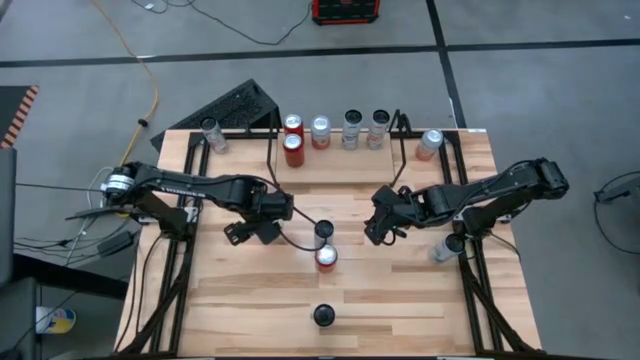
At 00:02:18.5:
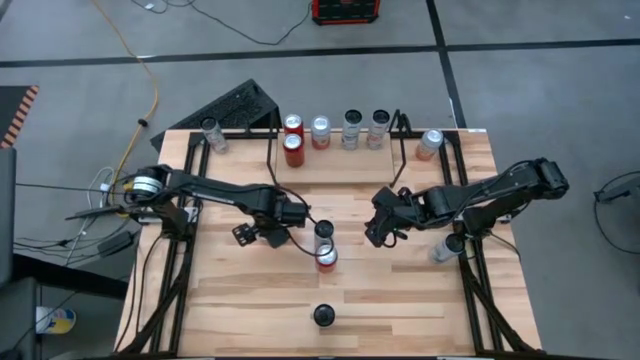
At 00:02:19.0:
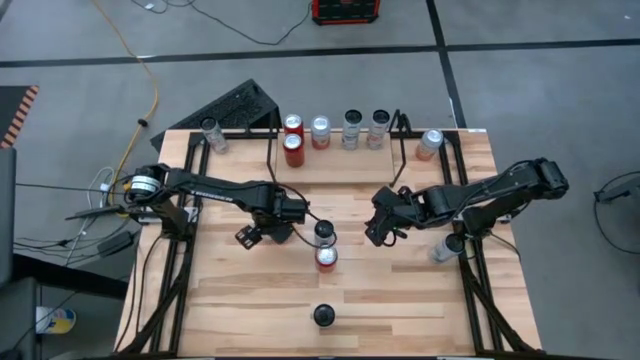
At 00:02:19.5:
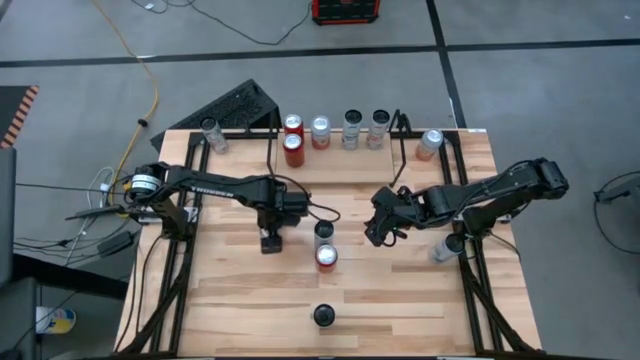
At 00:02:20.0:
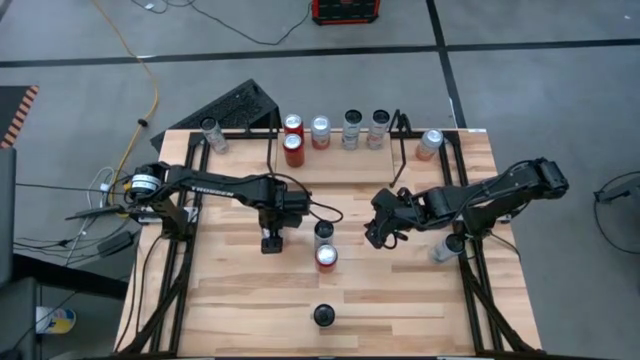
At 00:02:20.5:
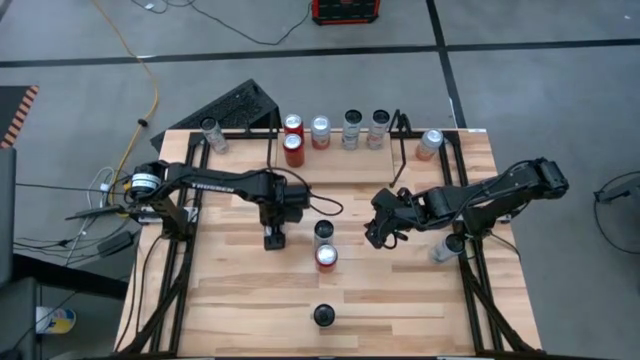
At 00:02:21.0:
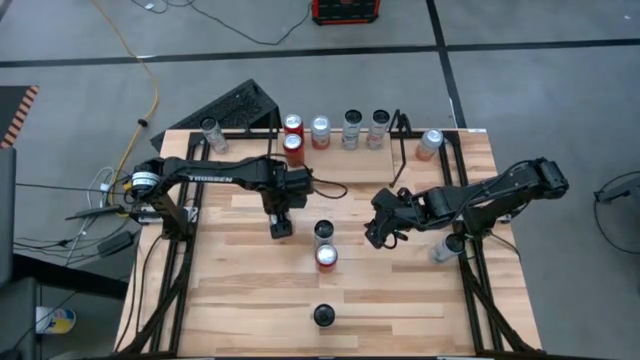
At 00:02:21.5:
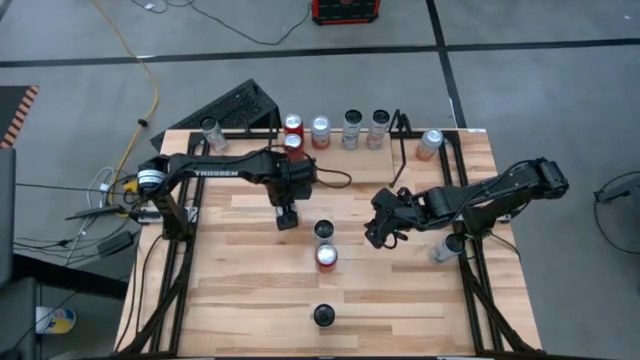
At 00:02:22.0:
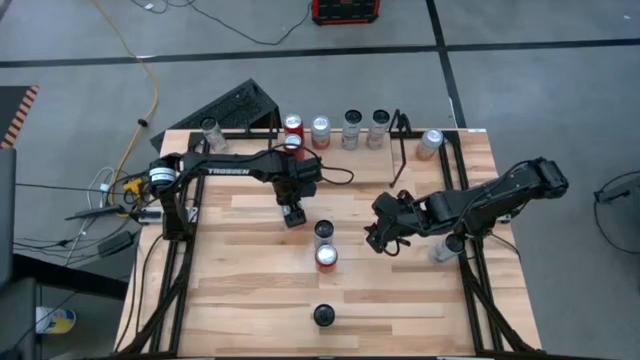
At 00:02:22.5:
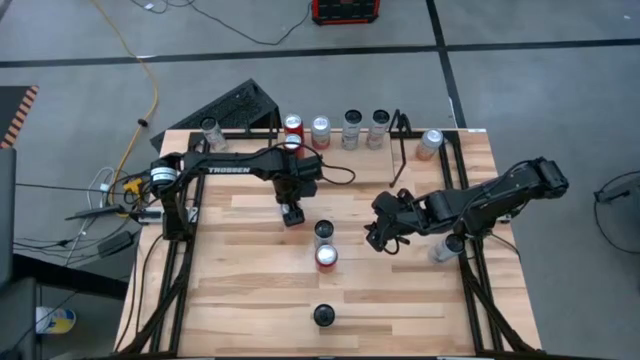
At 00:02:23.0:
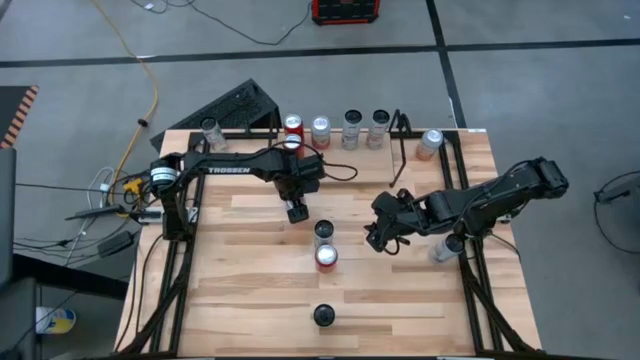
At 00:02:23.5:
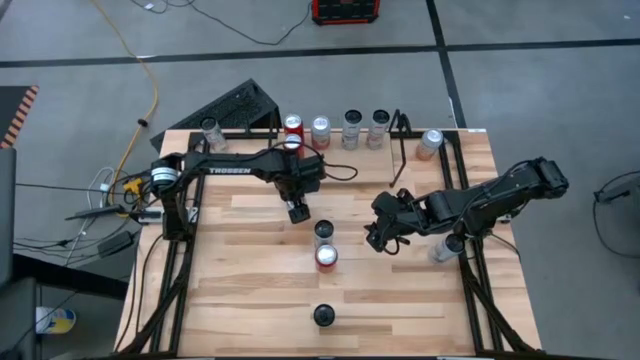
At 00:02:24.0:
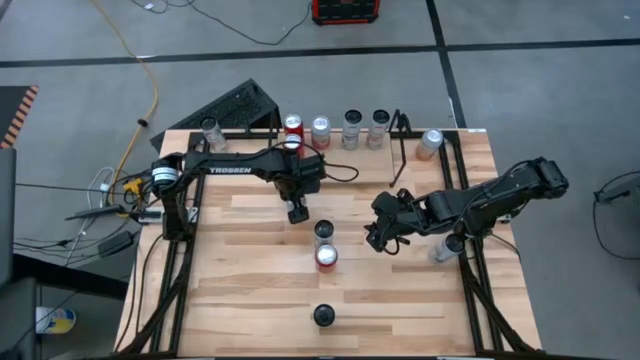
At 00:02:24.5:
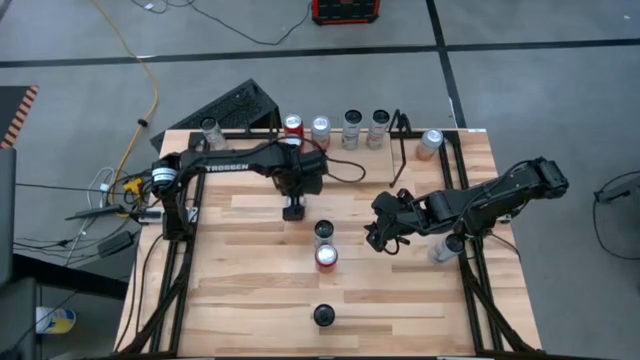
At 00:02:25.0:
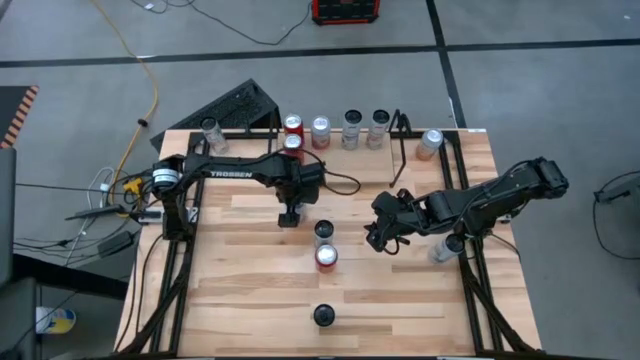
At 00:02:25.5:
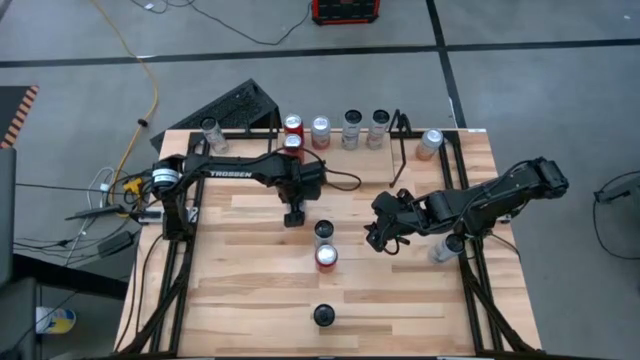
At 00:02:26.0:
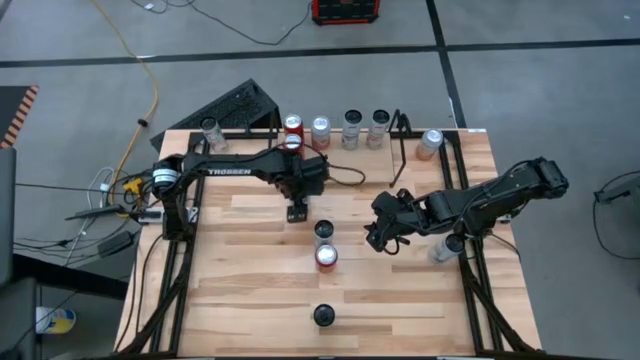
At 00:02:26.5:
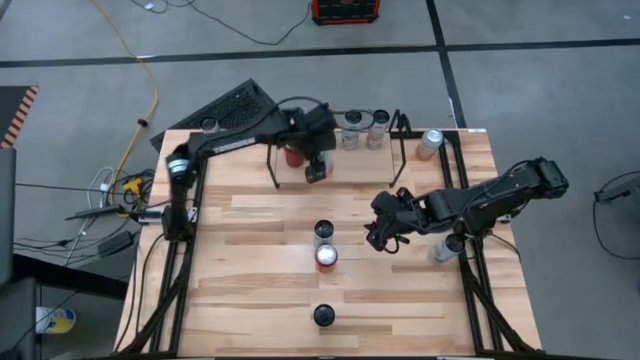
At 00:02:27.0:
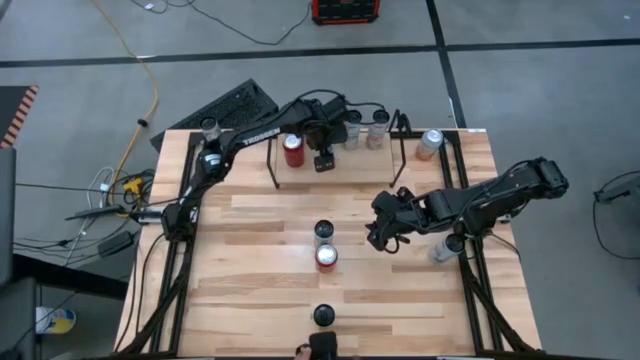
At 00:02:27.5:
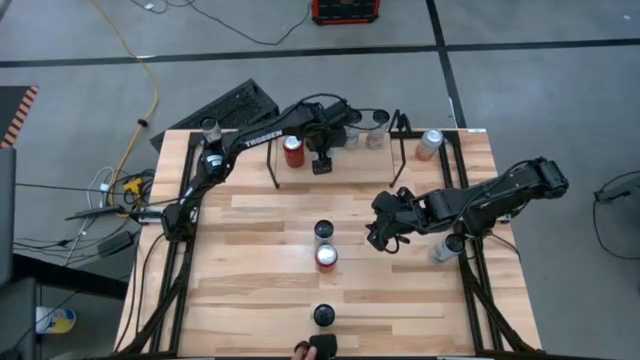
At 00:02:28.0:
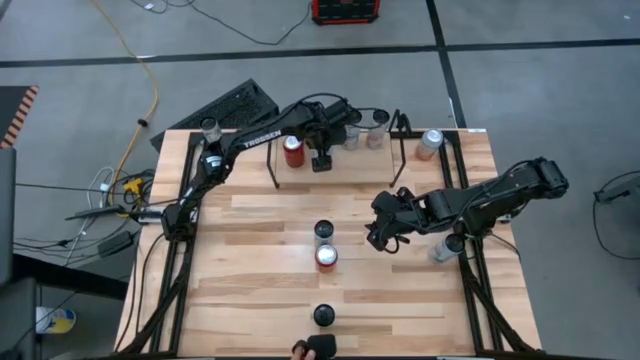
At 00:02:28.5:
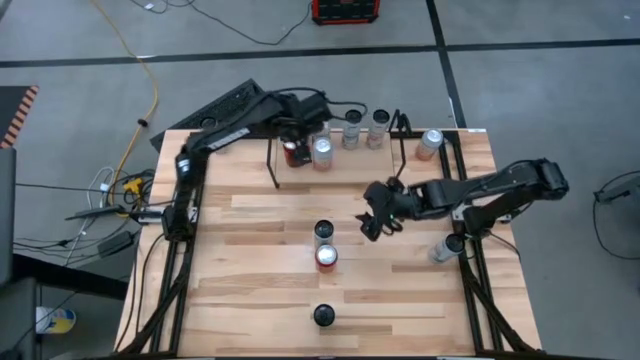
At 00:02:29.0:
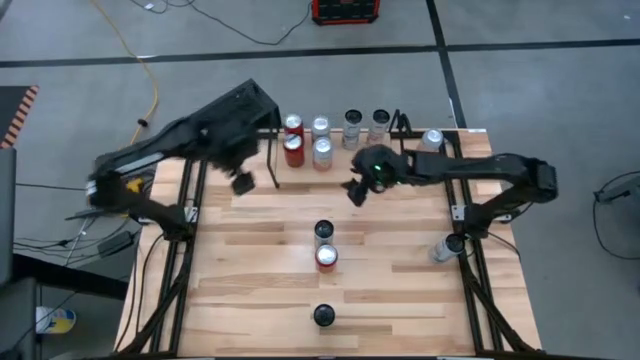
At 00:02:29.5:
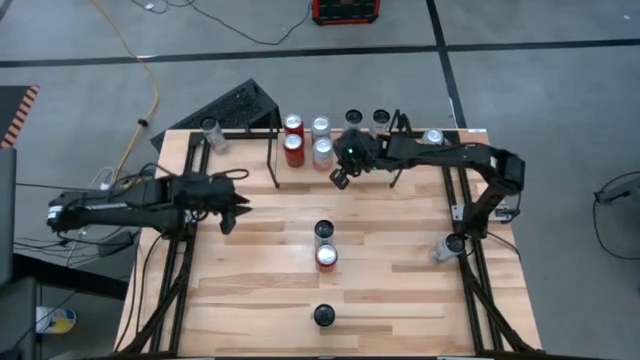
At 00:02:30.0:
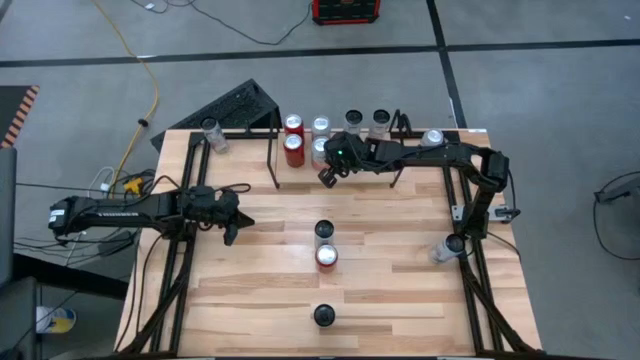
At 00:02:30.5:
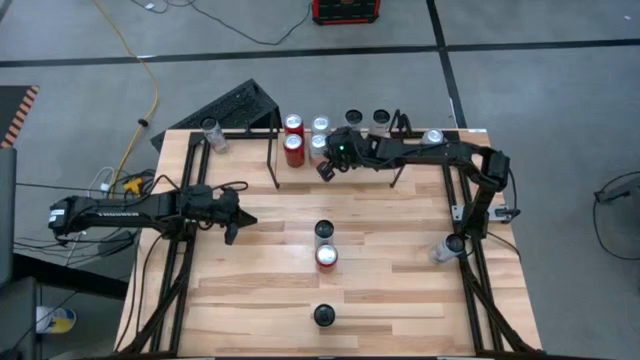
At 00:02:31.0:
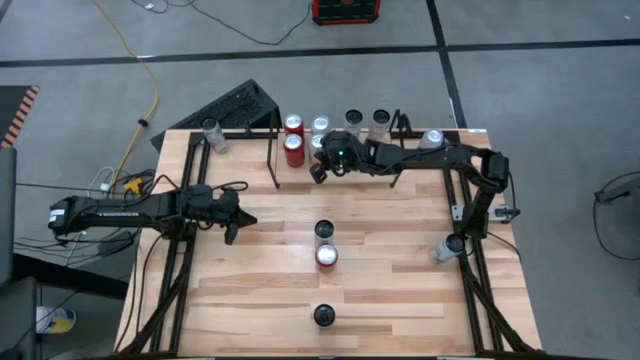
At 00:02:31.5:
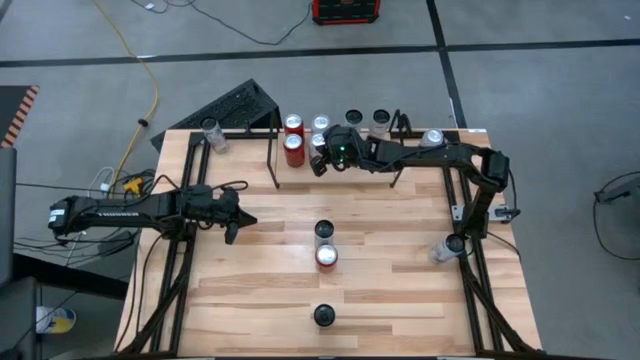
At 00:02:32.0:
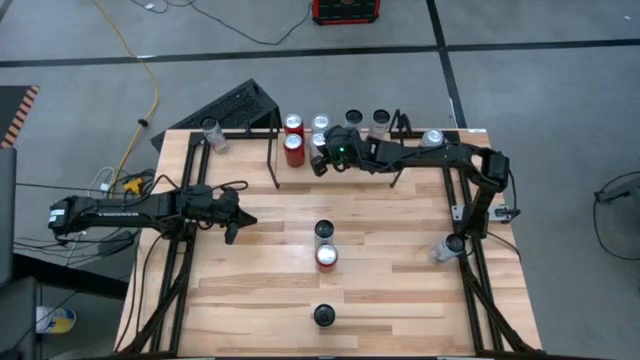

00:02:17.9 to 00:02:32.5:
Task: Place canned beverage on shelf
Put the bottom orange white soda can on the shelf
